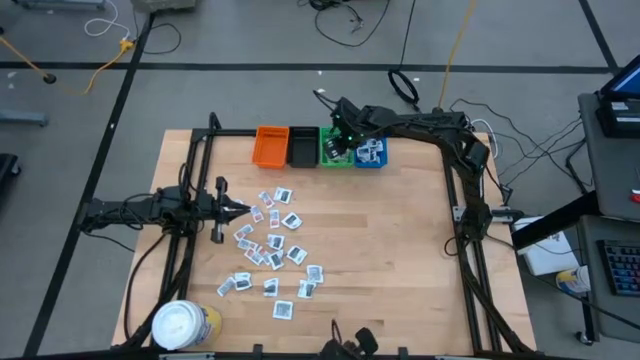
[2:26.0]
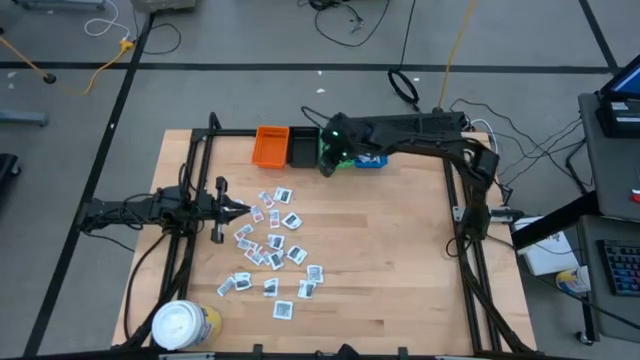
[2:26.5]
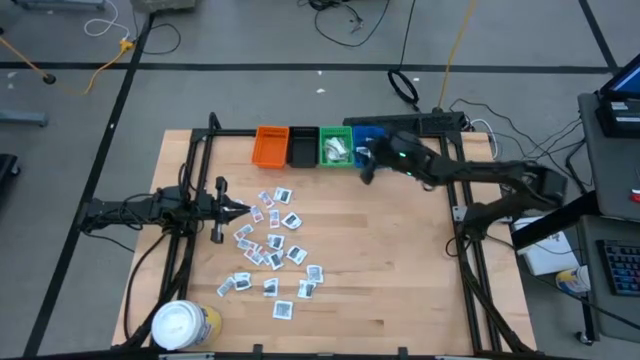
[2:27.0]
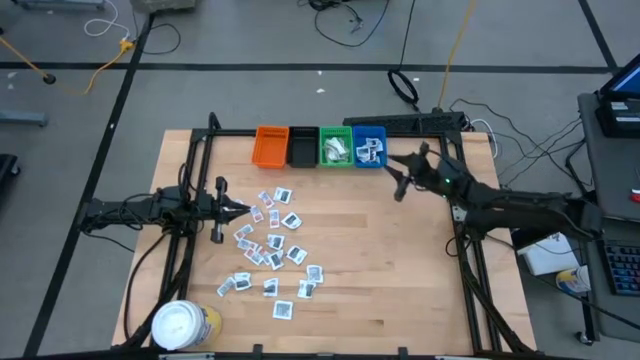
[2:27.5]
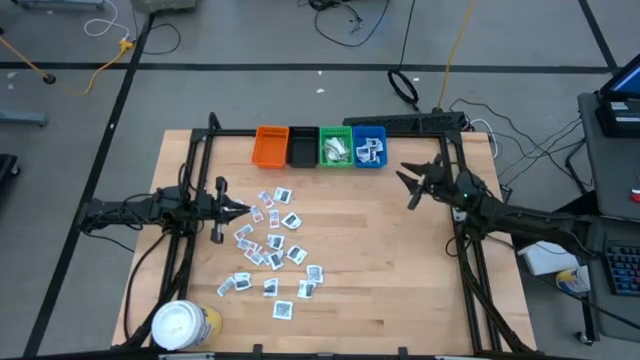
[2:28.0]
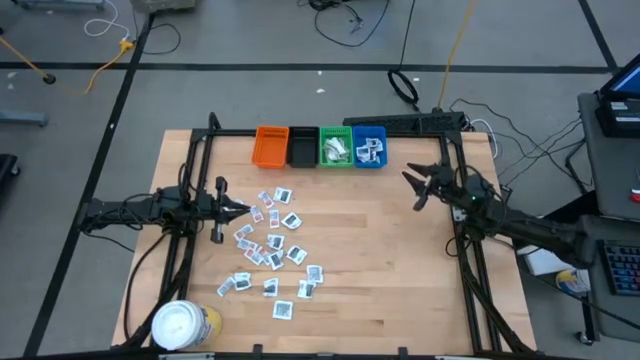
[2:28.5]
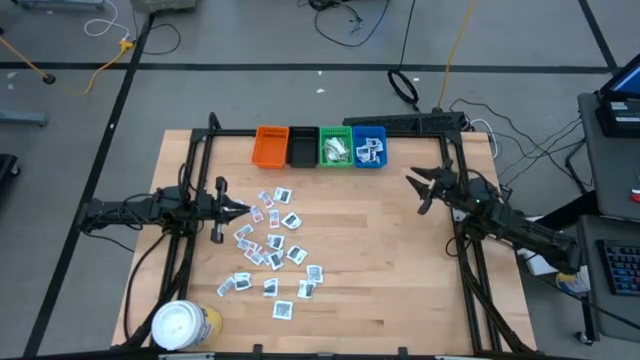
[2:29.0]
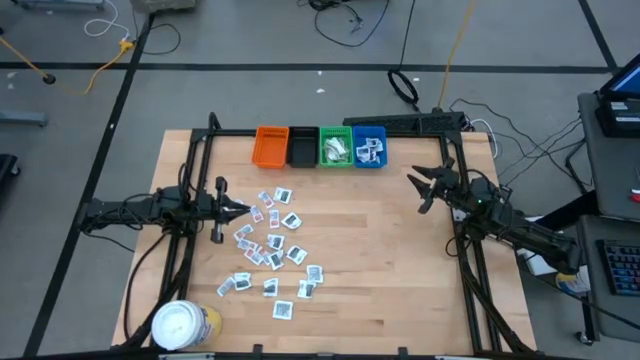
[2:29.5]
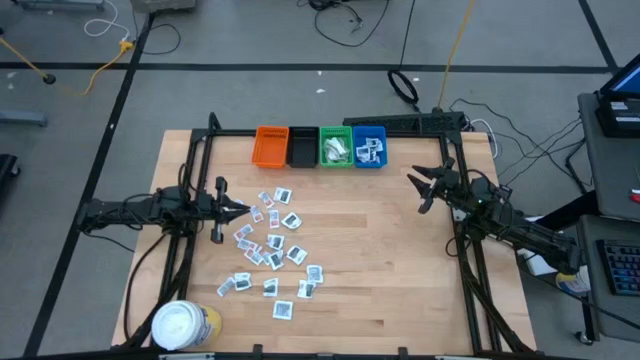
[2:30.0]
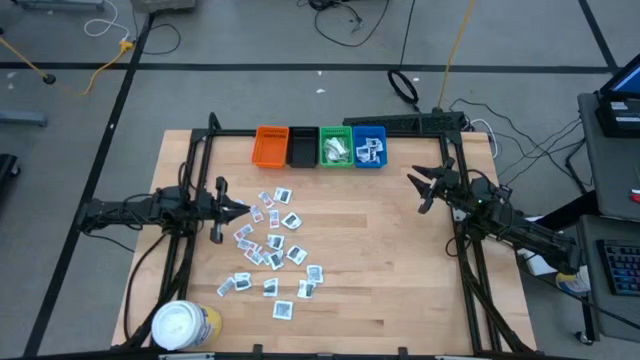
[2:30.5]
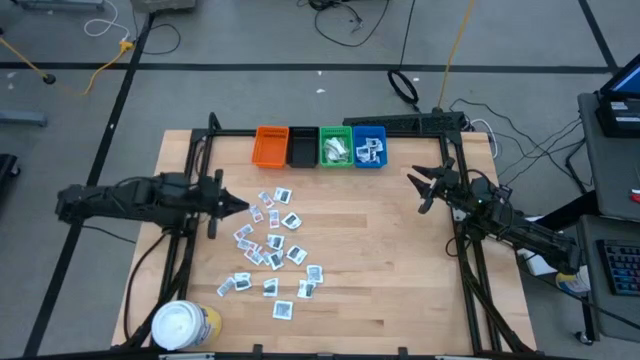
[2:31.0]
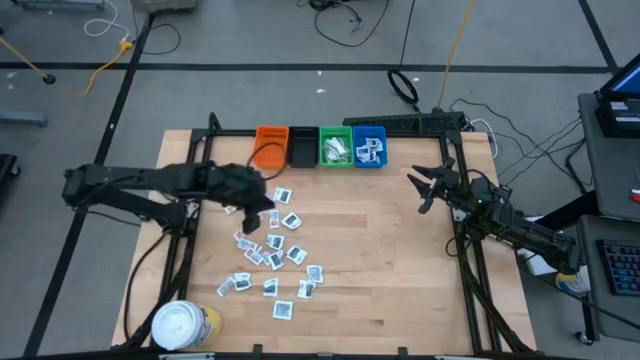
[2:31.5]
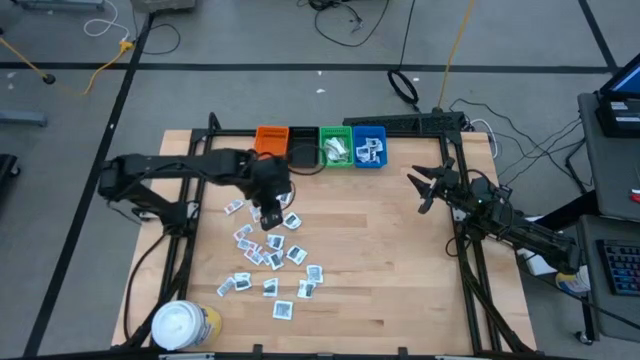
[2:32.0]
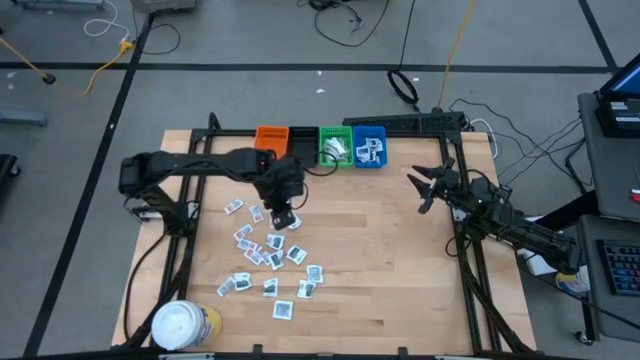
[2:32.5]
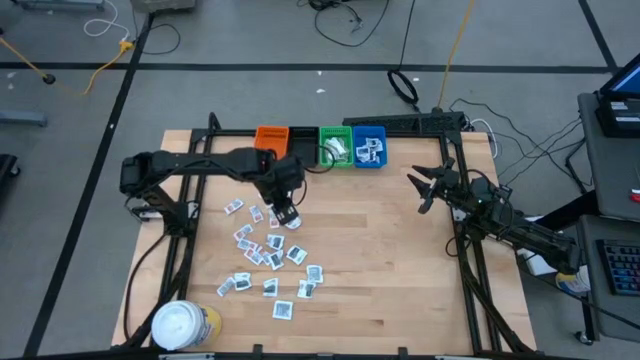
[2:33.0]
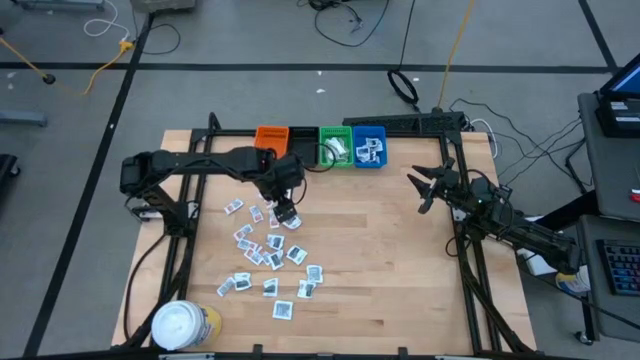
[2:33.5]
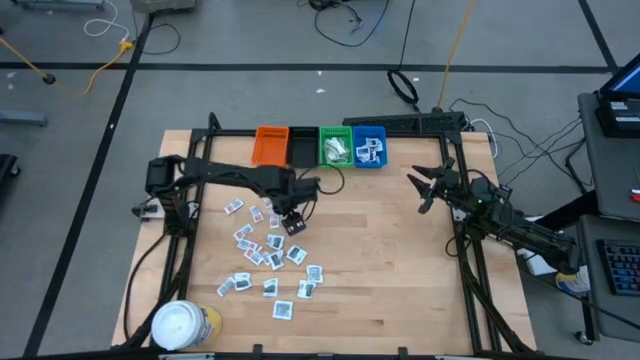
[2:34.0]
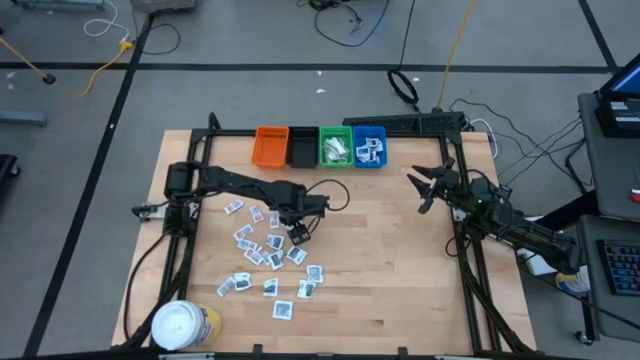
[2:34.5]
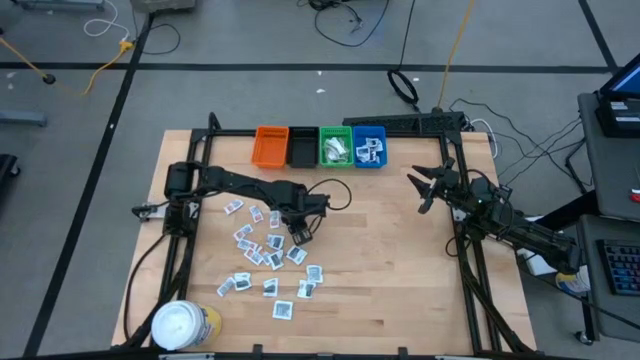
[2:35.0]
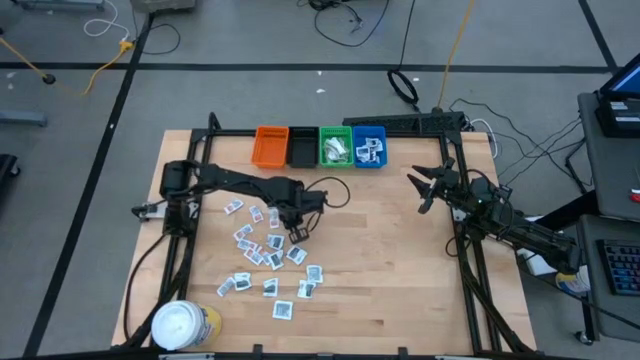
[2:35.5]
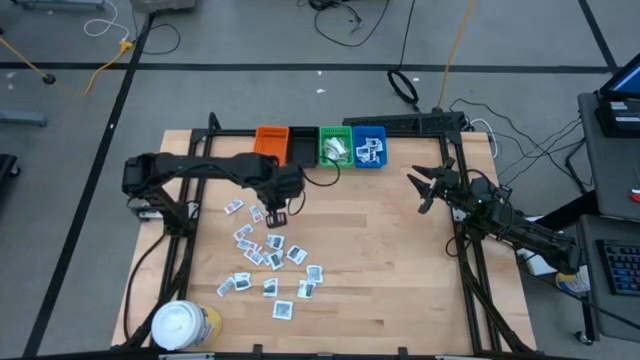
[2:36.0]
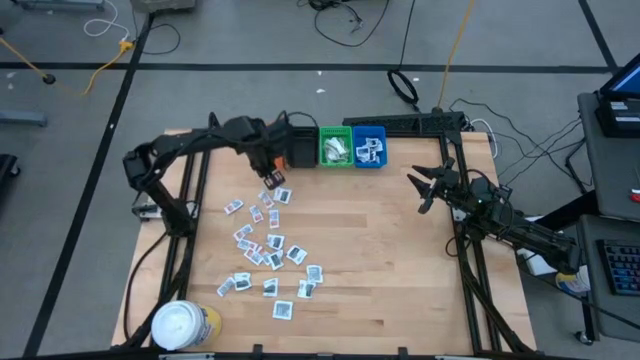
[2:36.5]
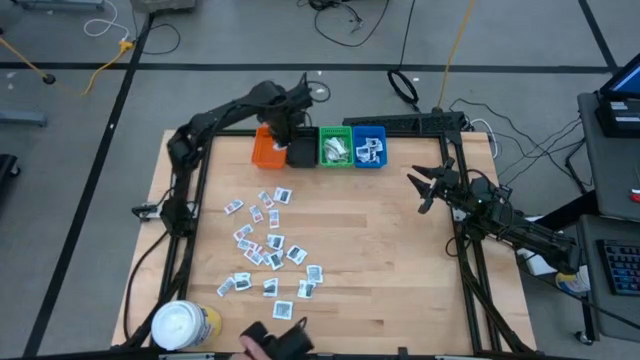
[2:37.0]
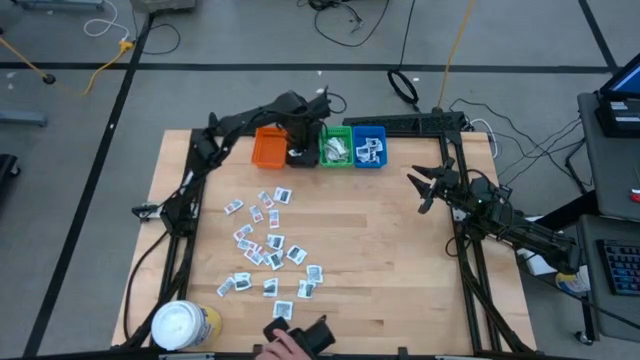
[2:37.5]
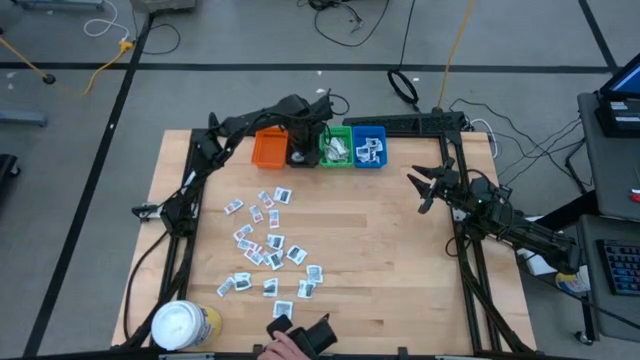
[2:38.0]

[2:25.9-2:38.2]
Task: Pick & Place First Aid Supplies
Put the blue packet into the black bin

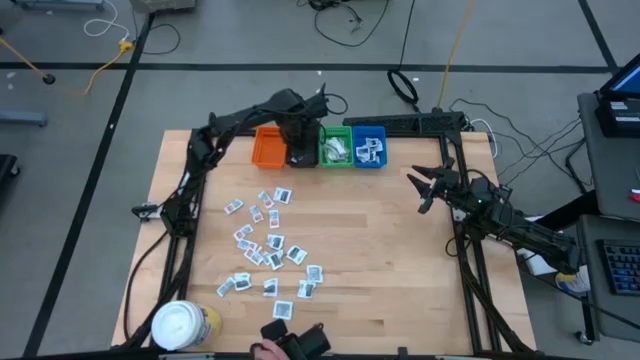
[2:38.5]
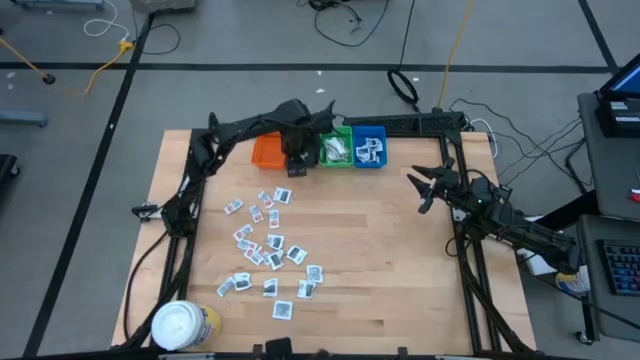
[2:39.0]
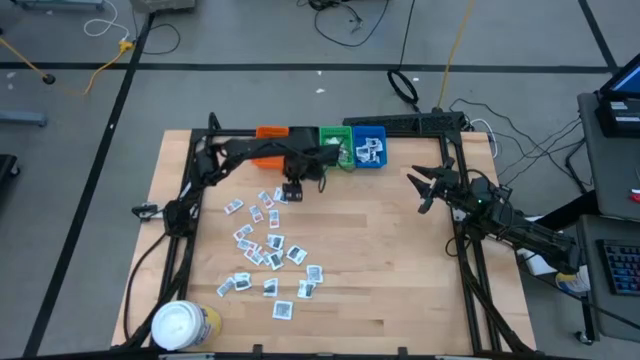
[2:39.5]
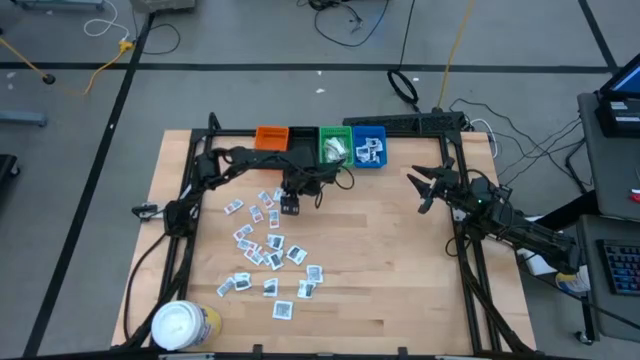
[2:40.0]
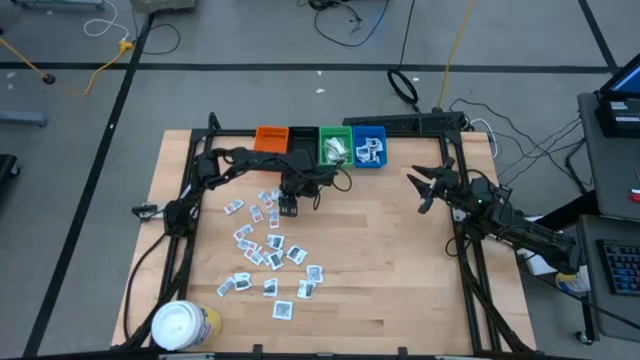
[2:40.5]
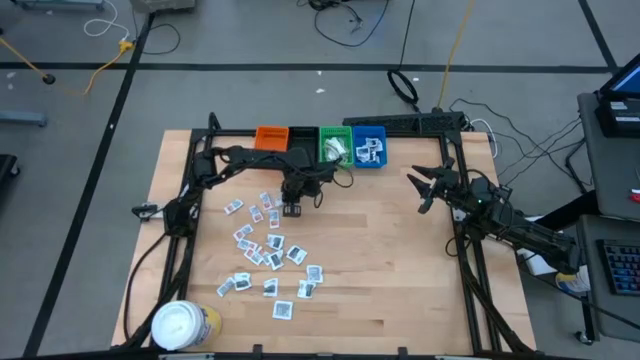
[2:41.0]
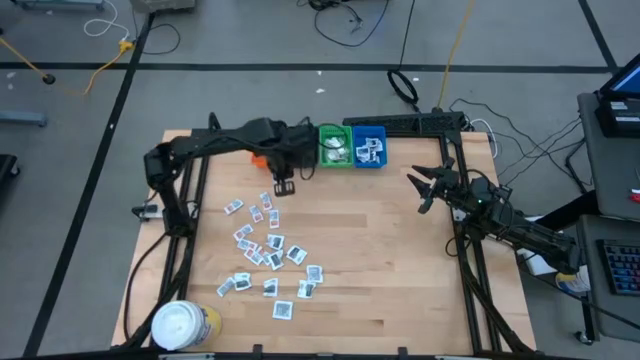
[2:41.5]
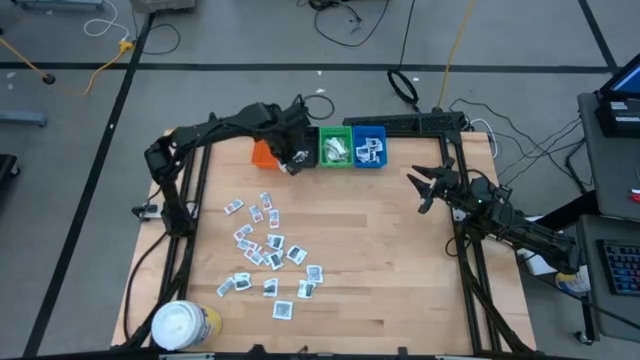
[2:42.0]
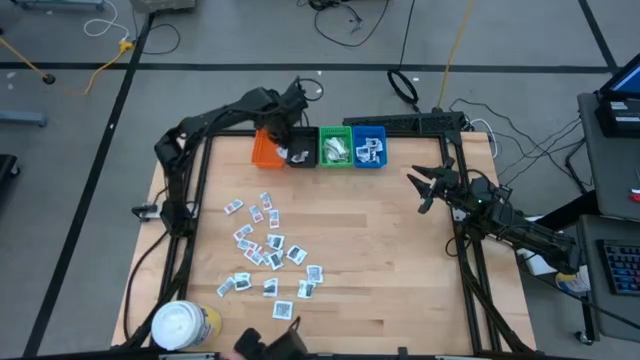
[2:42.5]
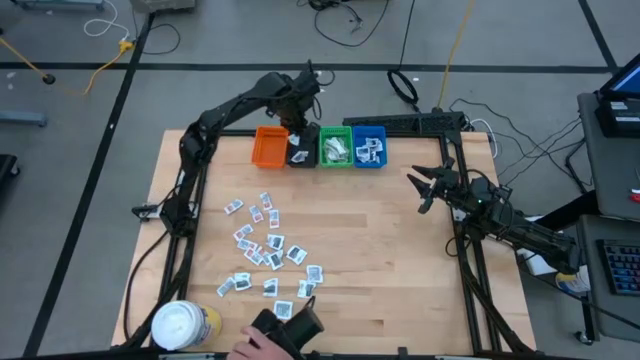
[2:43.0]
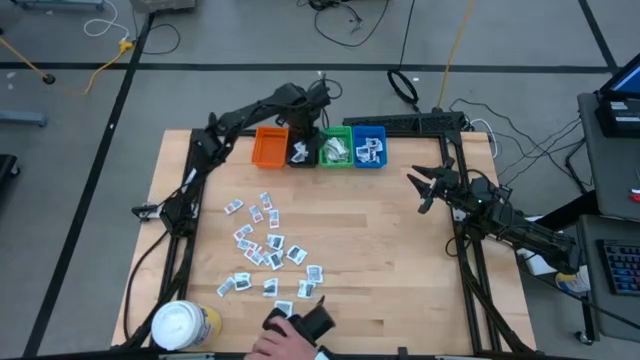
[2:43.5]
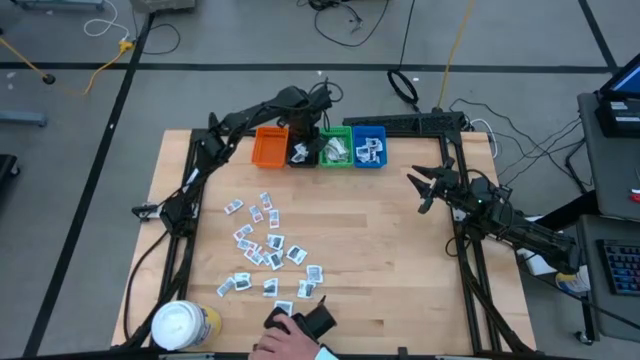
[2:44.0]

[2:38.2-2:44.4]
Put the blue packet into the black bin

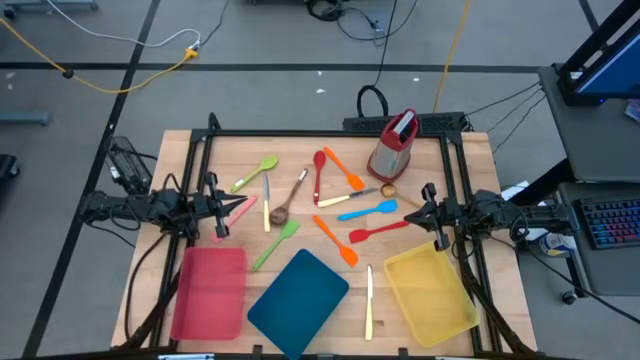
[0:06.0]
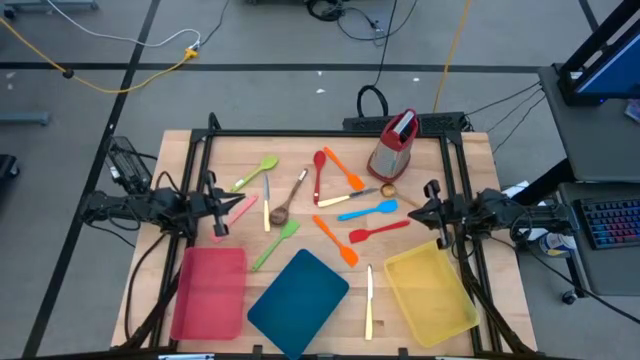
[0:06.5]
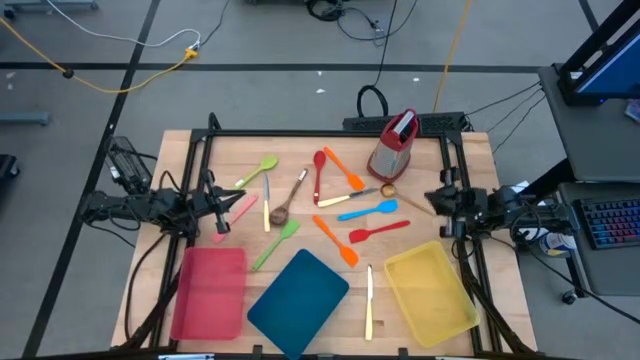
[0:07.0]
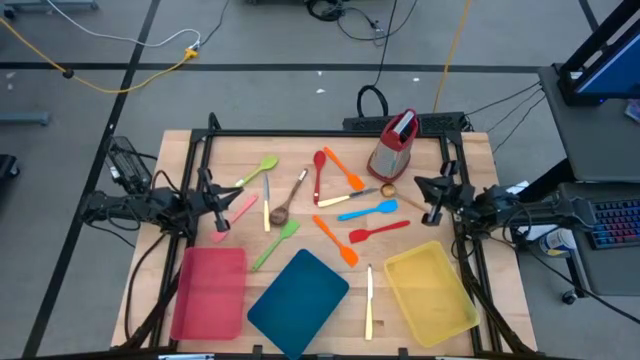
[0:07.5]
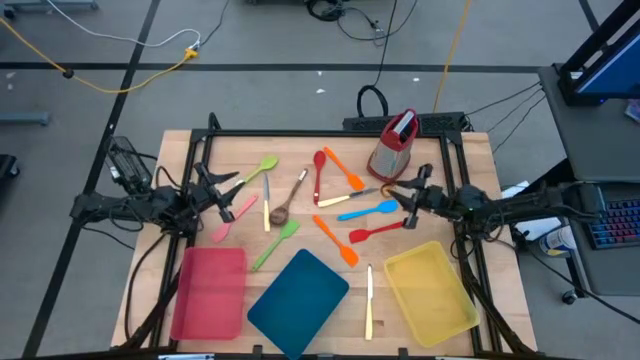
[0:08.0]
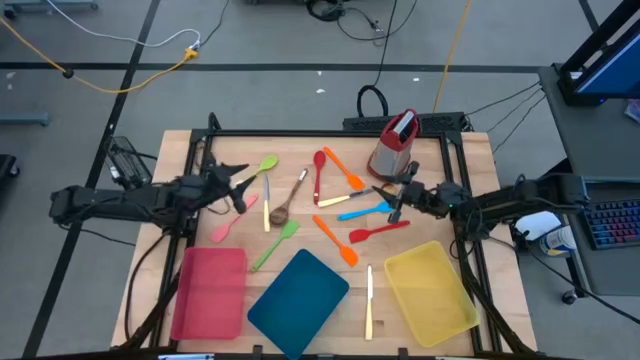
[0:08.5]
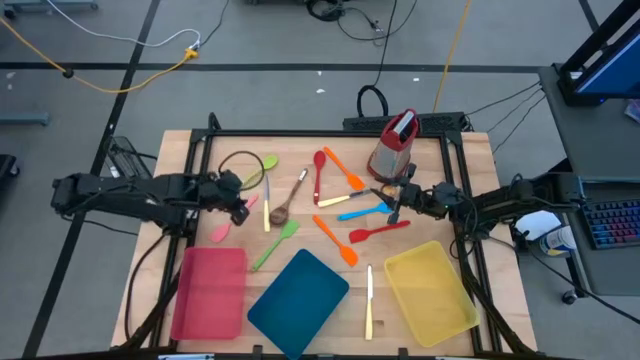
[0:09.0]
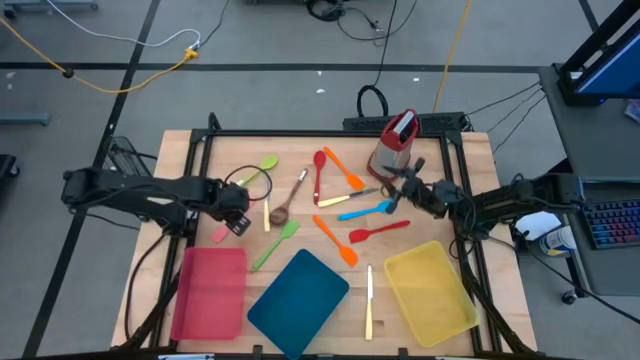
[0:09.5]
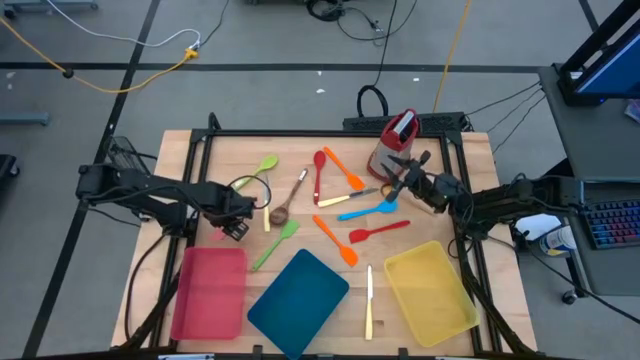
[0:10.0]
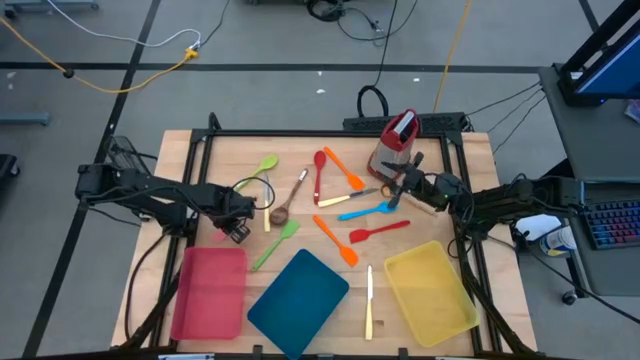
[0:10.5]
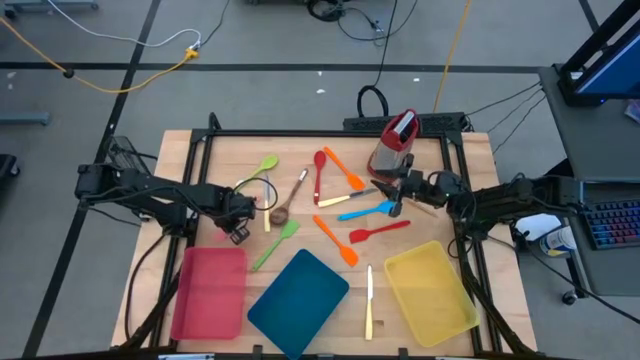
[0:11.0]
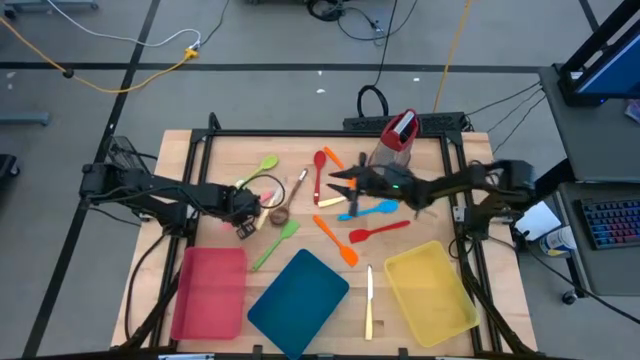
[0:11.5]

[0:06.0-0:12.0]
Task: Pick & Place Kitchen Items
Put the pink spatula into the pink bin
